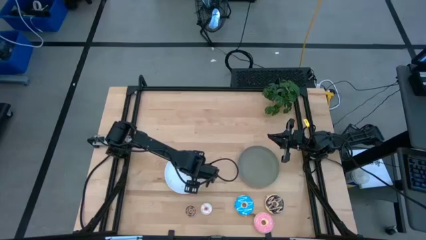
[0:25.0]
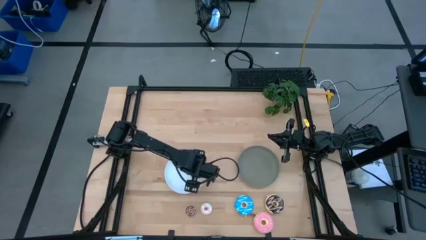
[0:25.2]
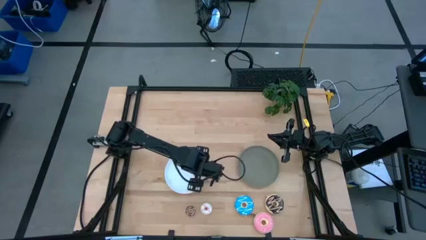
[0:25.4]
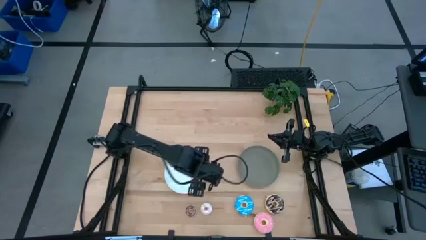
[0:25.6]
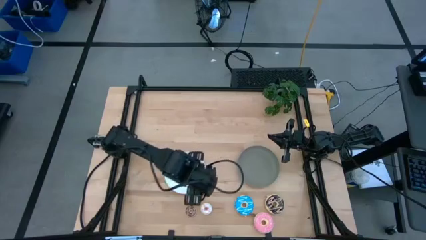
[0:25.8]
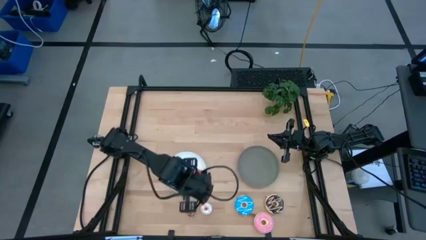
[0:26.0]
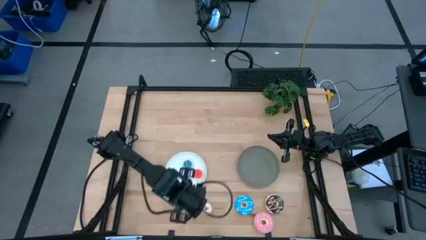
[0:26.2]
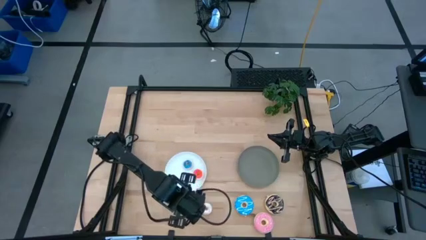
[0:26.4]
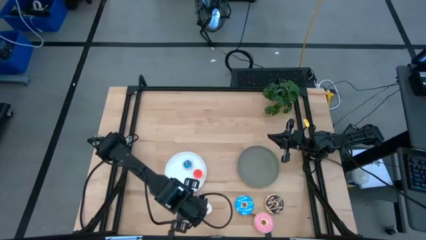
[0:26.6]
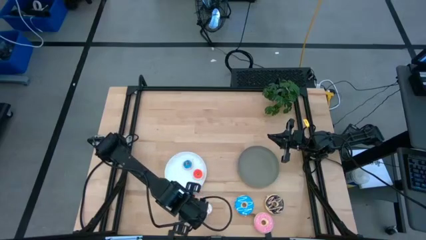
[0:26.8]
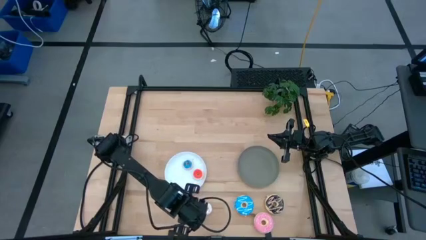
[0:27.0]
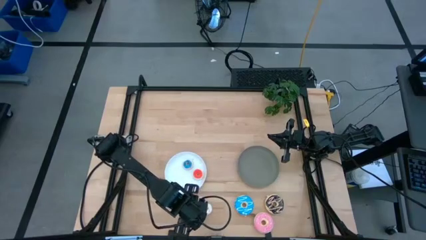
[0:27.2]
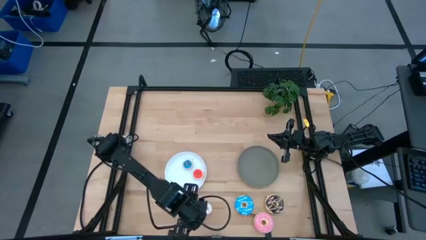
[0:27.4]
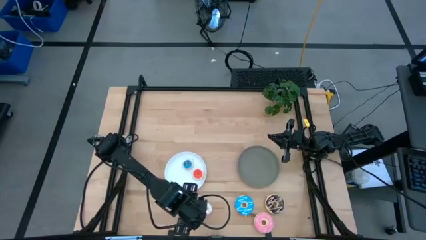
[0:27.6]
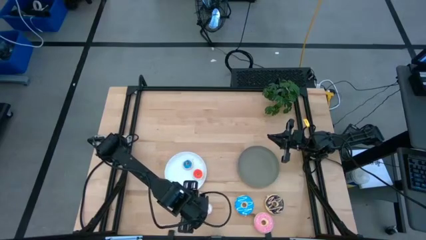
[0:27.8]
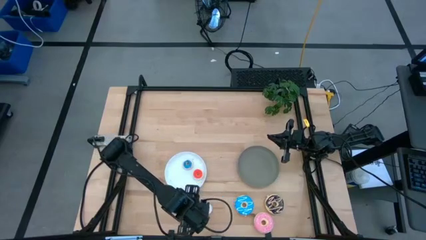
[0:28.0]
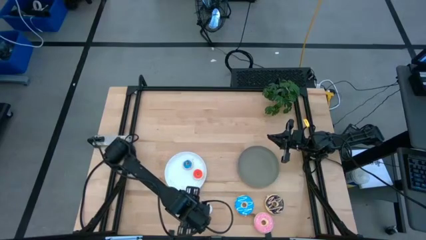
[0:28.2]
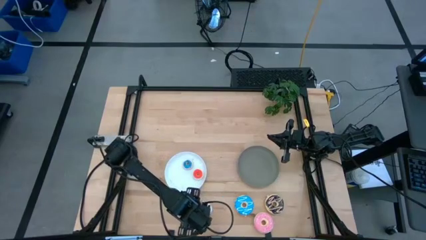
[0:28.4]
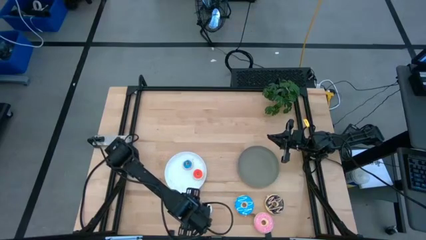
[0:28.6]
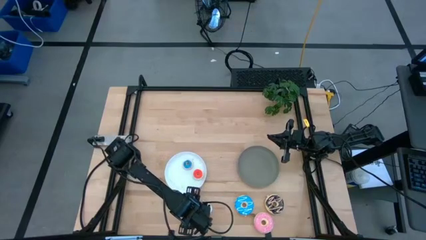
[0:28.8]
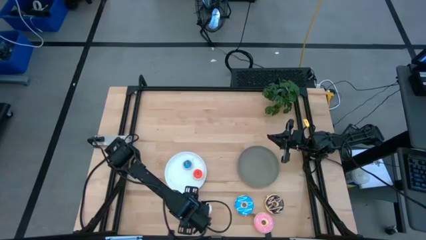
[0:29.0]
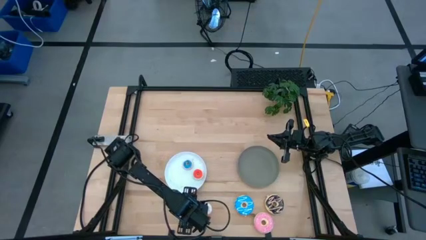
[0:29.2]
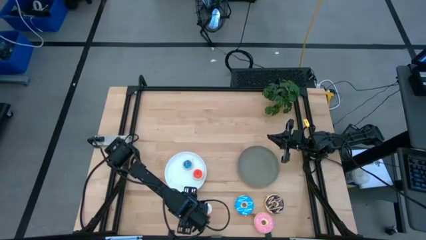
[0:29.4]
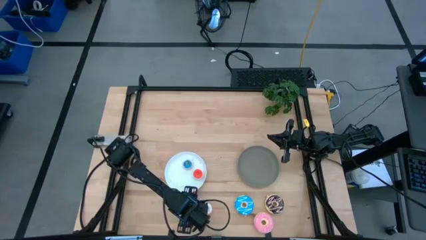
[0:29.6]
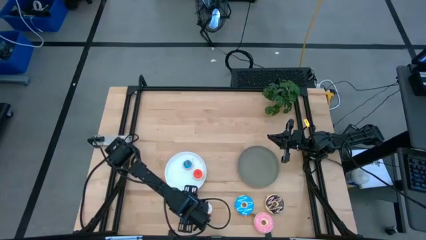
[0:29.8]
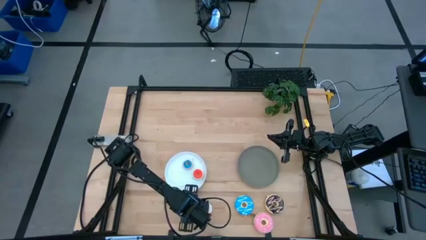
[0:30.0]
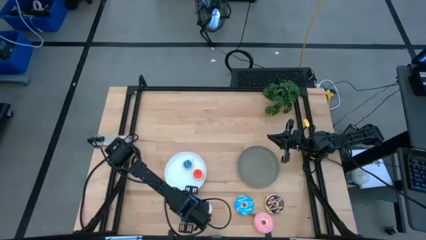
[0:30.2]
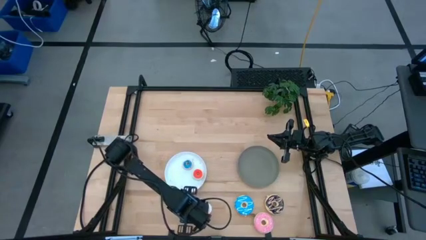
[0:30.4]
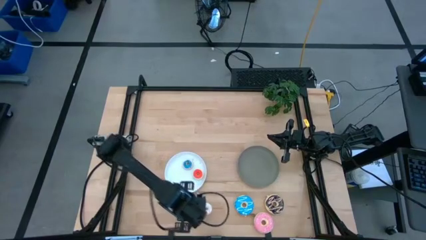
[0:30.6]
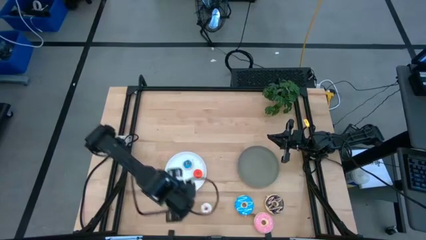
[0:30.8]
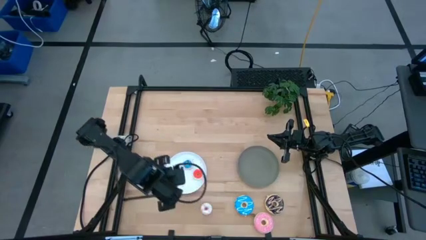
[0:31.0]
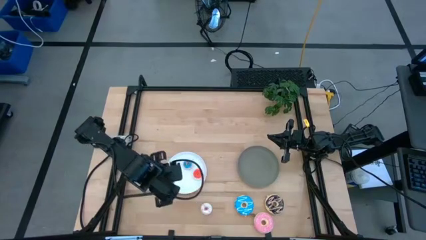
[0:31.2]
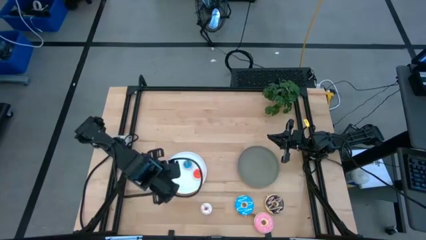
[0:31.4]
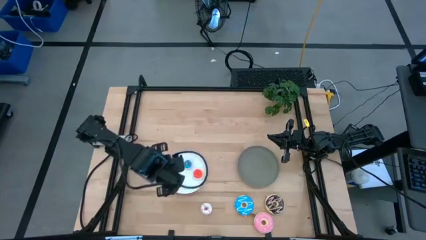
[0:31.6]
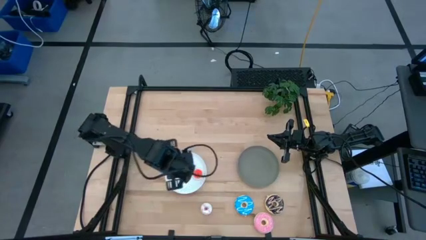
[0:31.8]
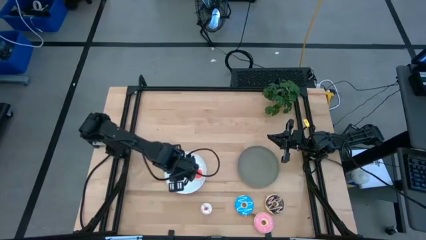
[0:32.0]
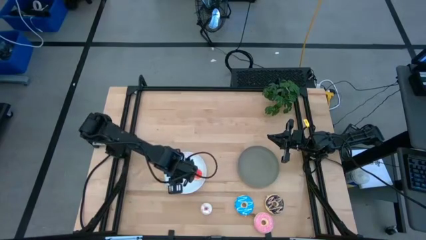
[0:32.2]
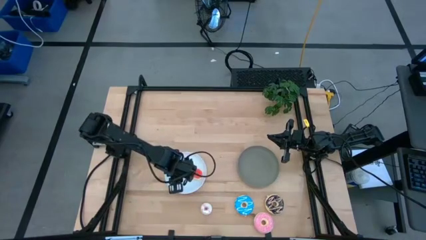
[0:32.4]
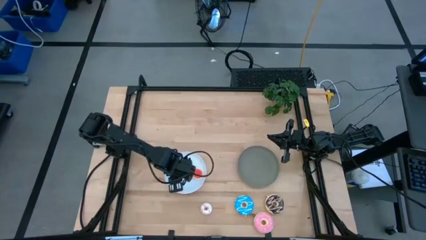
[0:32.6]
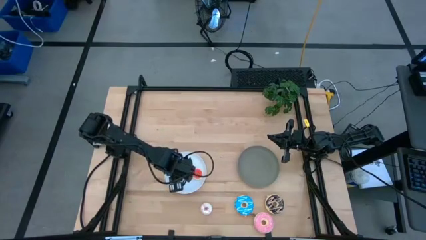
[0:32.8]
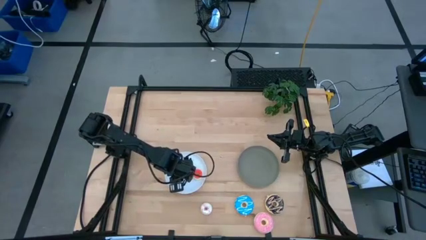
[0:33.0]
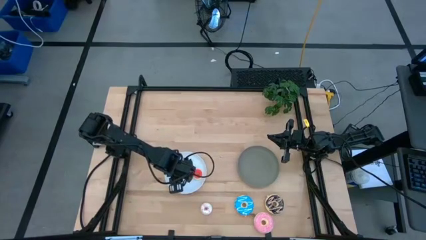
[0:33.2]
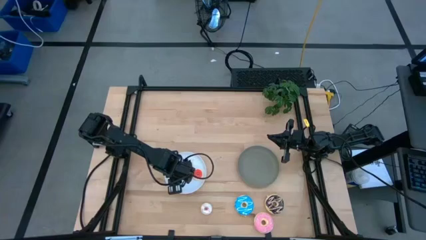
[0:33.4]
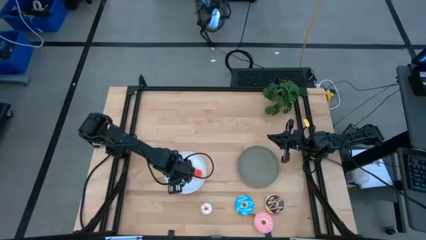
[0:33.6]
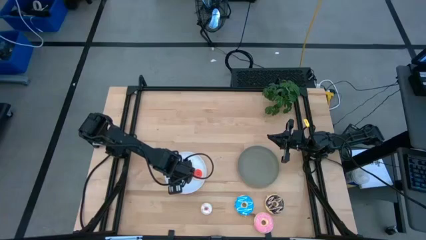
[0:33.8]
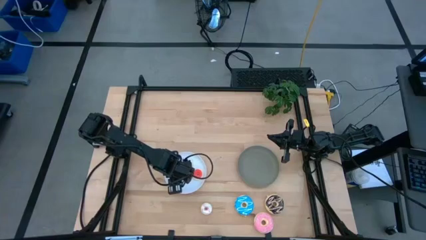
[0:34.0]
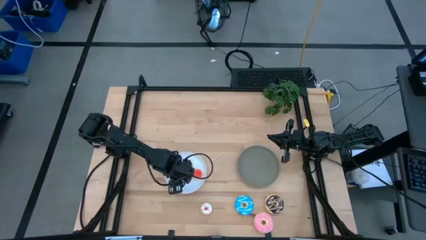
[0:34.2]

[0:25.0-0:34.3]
Task: Pick & Place donuts
Put the small brown donut on the white plate

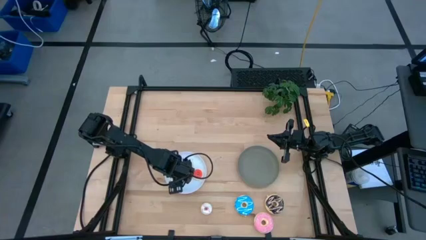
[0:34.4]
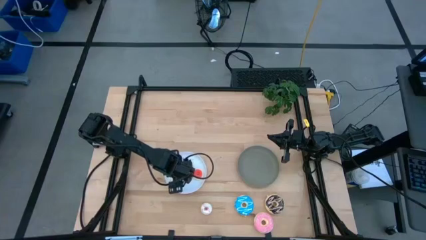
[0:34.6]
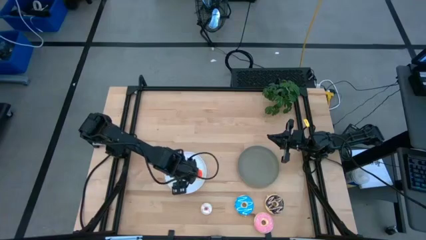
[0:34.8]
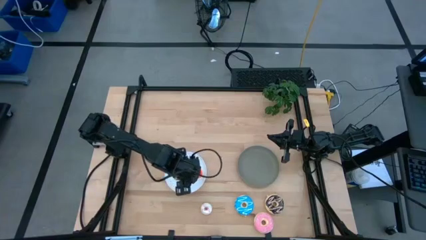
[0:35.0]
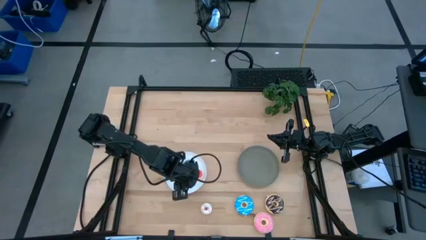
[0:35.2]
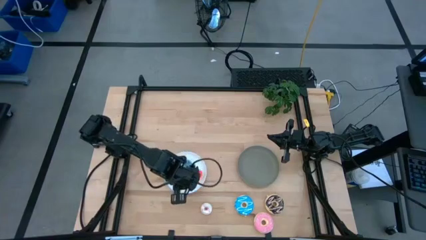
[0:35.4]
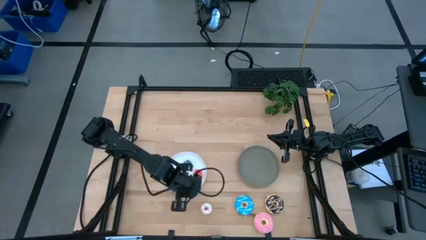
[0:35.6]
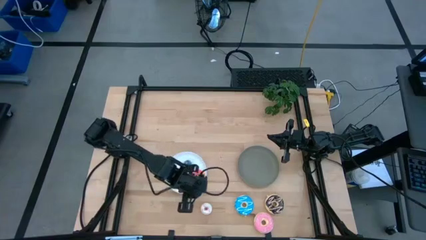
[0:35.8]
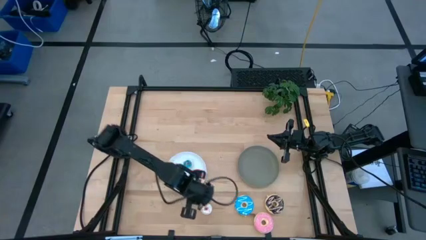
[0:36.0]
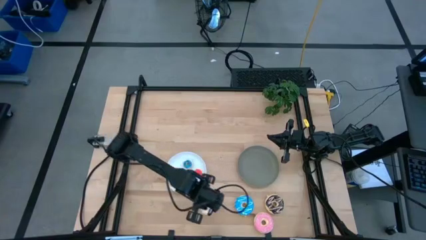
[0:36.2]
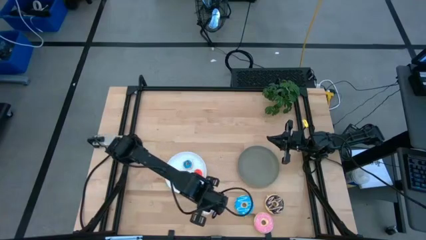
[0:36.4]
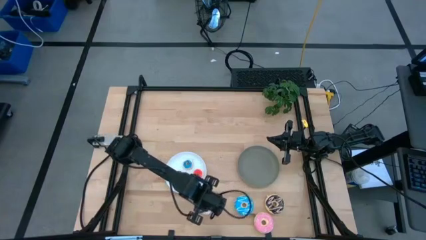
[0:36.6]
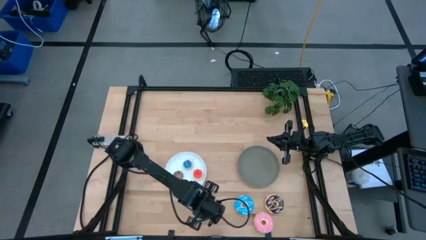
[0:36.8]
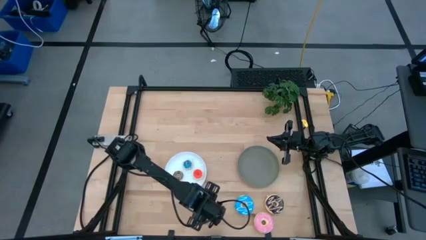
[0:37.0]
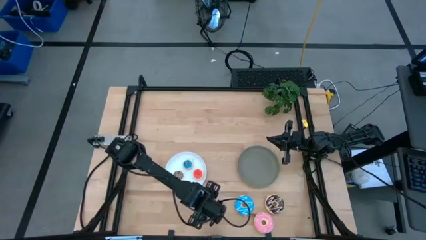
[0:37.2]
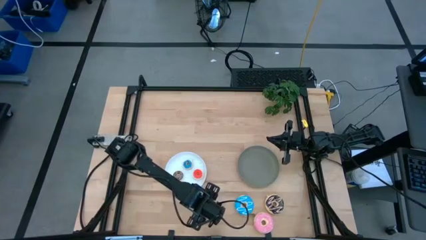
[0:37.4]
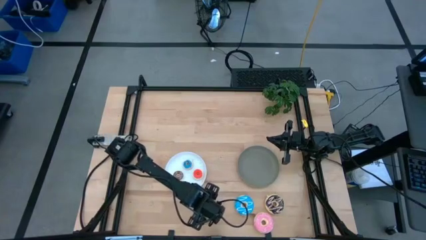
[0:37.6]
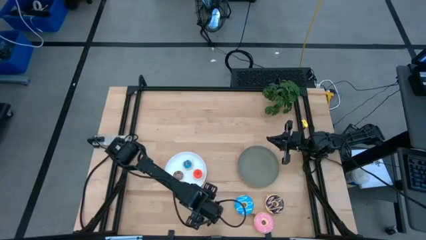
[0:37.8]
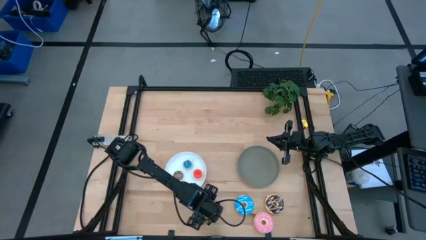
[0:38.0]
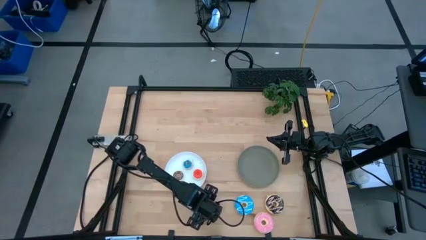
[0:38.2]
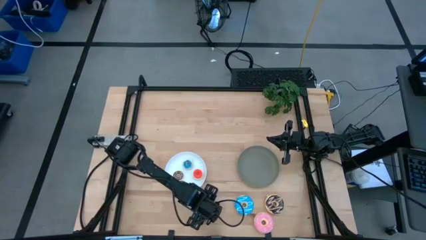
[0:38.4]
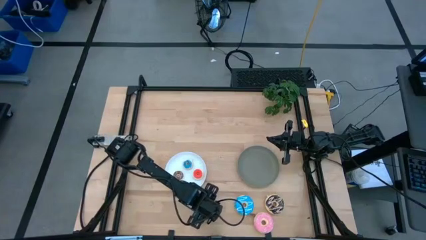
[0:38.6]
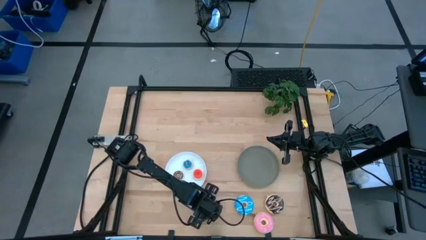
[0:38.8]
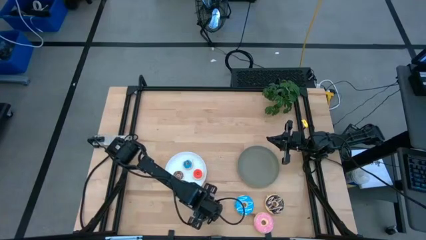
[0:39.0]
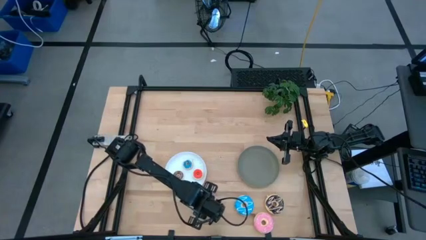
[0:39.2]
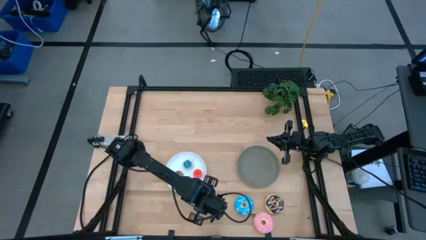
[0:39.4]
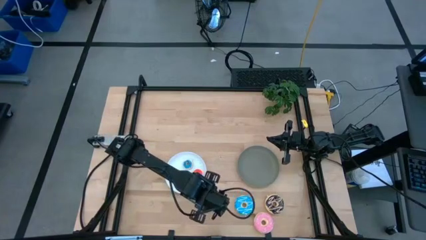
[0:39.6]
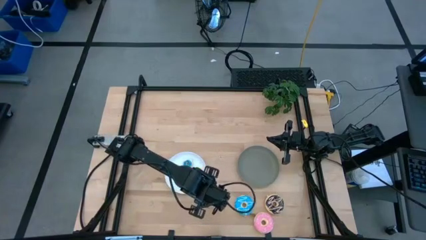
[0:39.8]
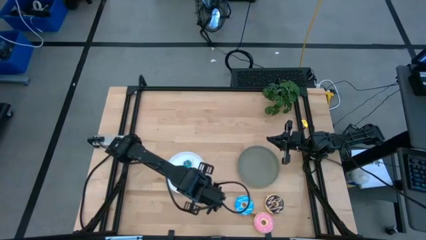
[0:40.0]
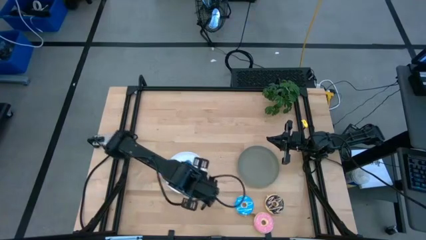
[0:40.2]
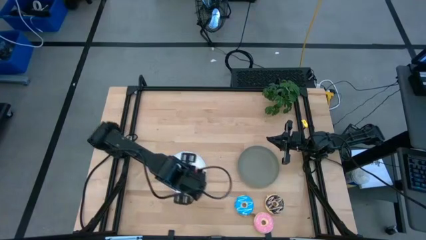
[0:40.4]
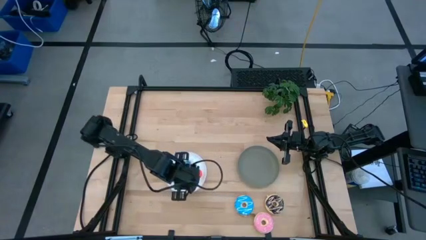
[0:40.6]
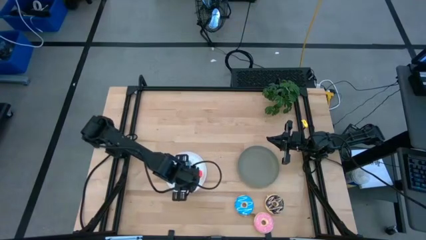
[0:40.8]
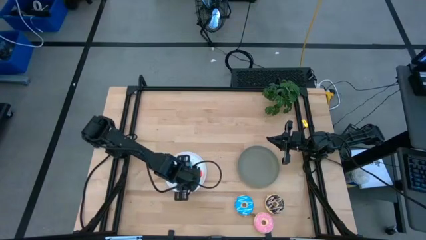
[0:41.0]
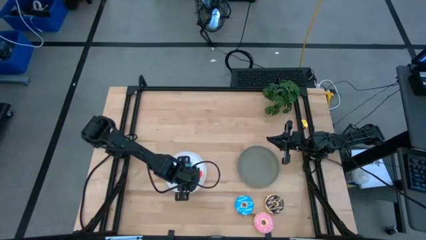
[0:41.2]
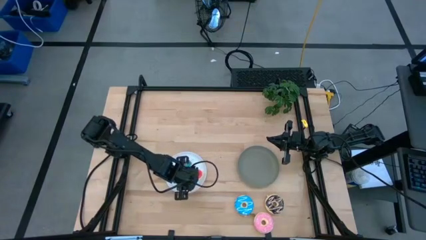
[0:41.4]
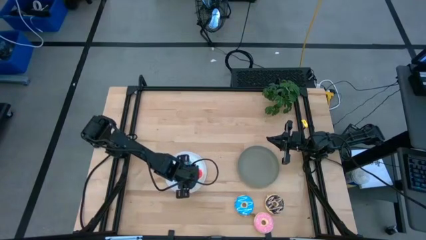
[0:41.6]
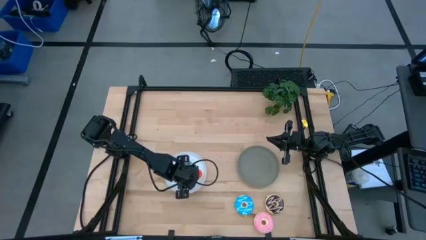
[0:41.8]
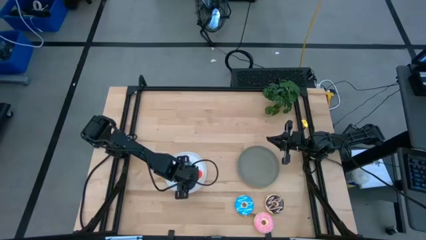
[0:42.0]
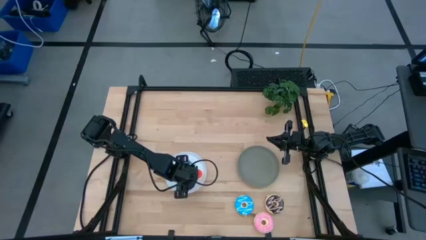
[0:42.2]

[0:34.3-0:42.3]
Put the small white donut on the white plate
